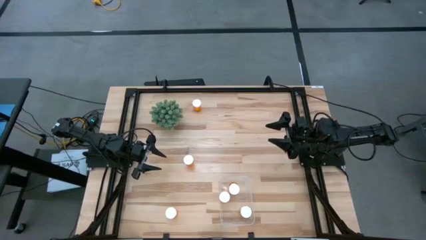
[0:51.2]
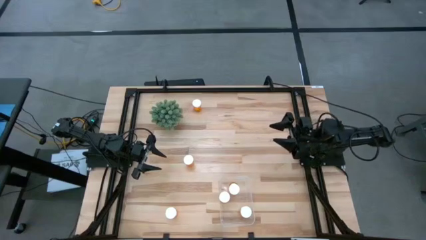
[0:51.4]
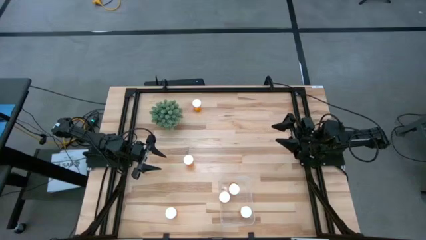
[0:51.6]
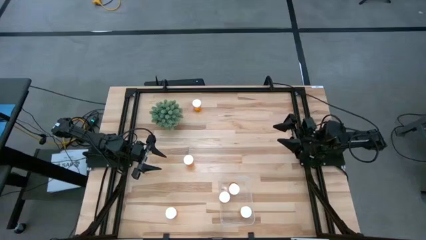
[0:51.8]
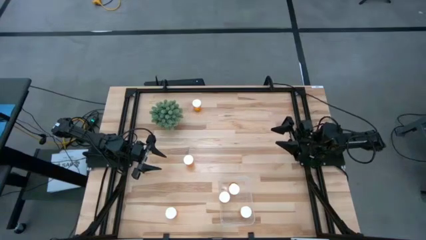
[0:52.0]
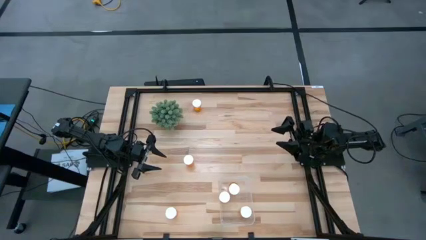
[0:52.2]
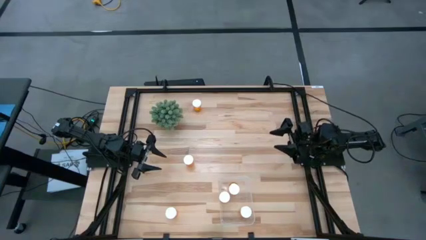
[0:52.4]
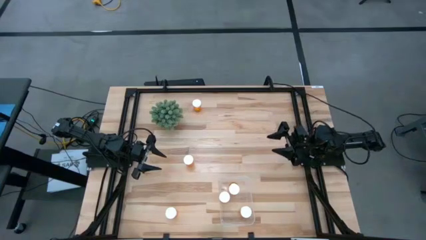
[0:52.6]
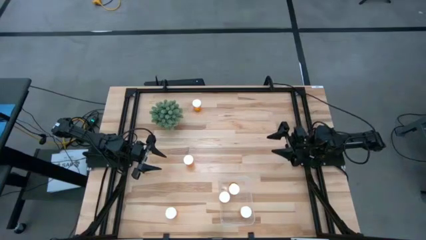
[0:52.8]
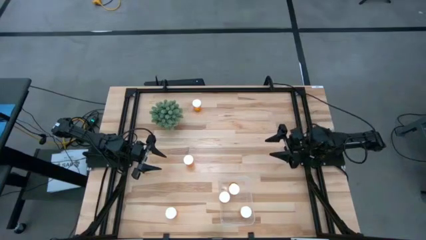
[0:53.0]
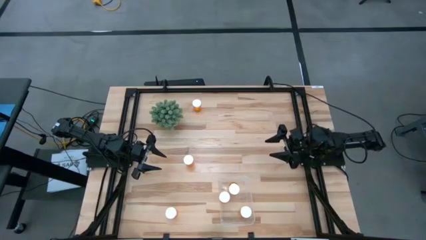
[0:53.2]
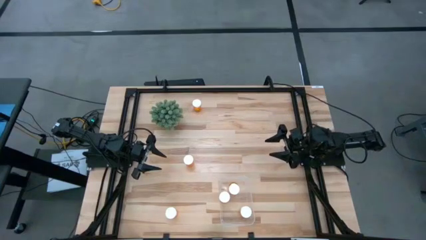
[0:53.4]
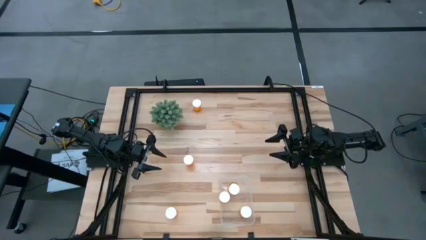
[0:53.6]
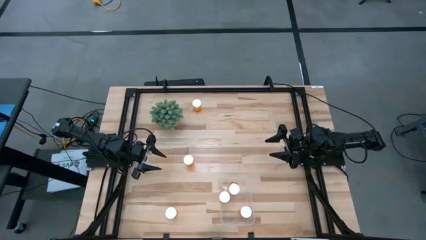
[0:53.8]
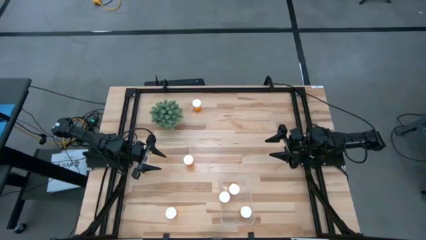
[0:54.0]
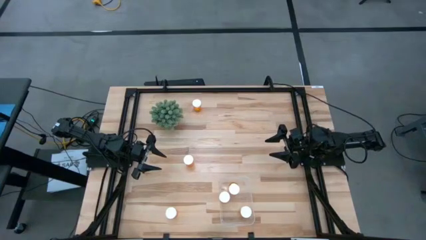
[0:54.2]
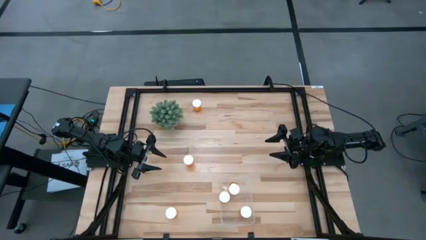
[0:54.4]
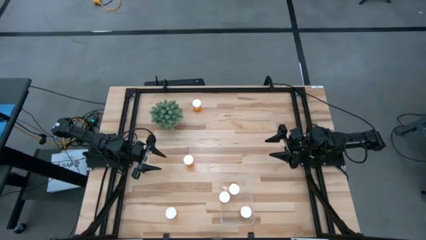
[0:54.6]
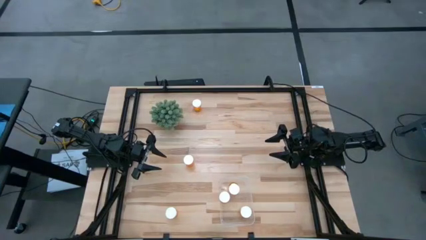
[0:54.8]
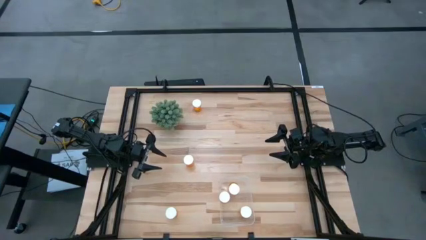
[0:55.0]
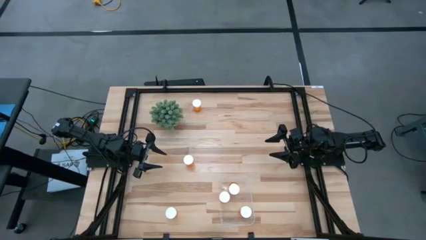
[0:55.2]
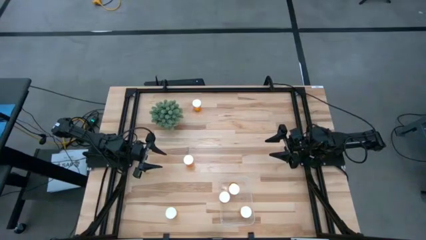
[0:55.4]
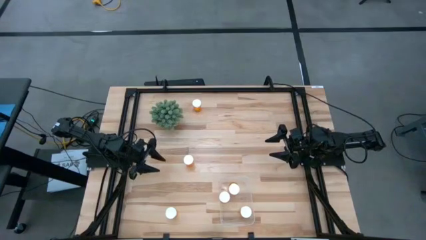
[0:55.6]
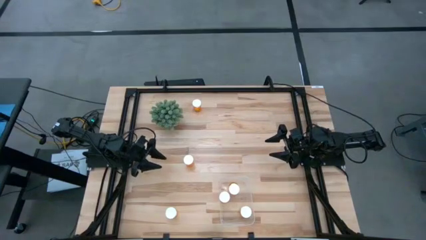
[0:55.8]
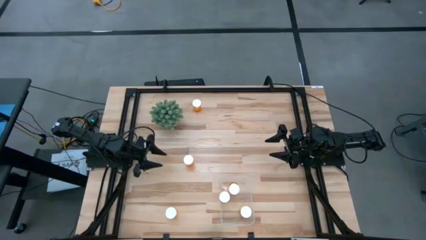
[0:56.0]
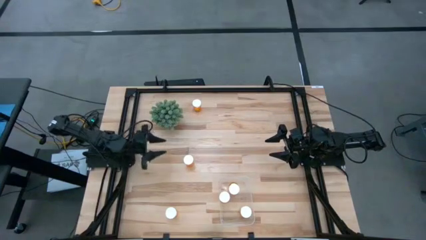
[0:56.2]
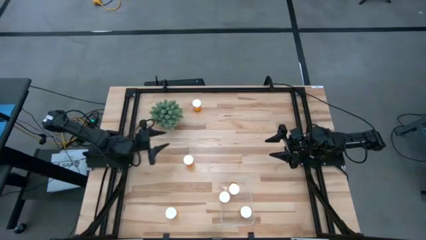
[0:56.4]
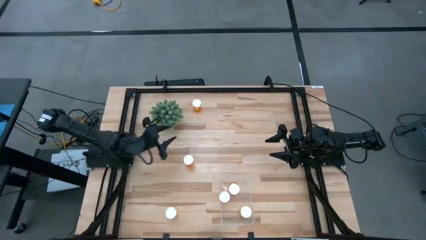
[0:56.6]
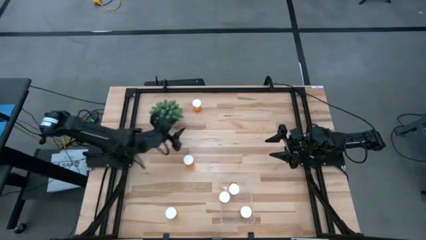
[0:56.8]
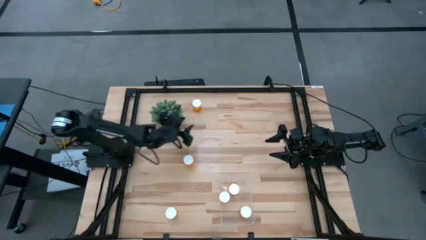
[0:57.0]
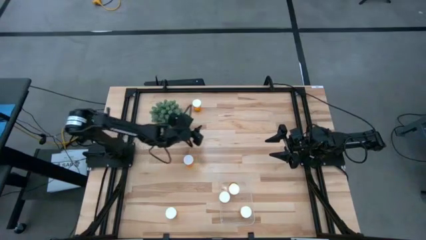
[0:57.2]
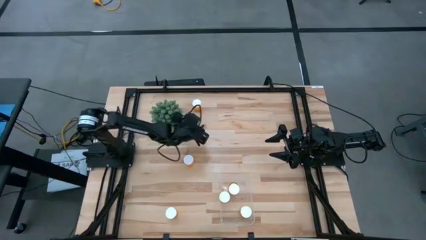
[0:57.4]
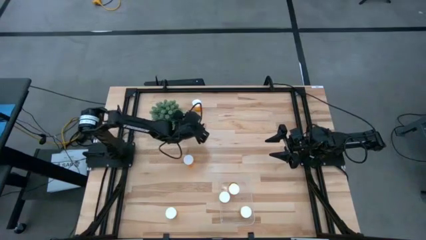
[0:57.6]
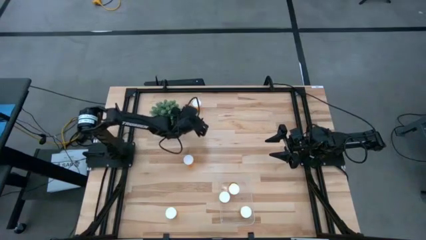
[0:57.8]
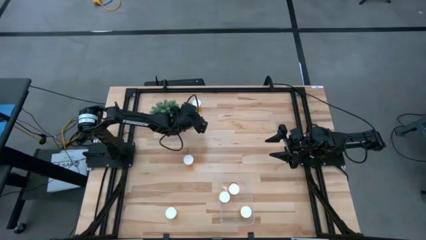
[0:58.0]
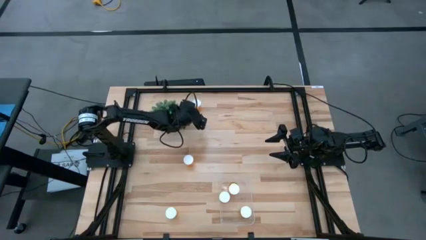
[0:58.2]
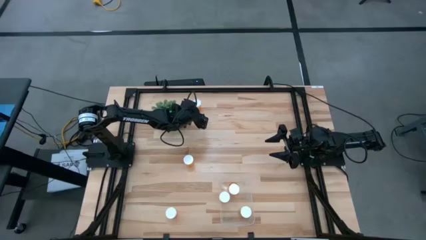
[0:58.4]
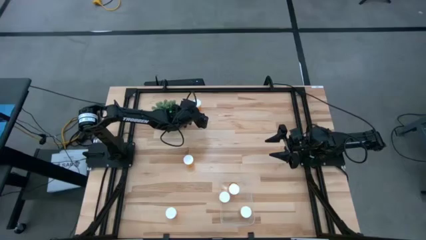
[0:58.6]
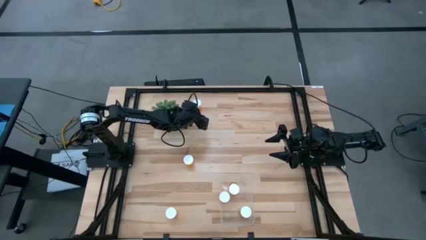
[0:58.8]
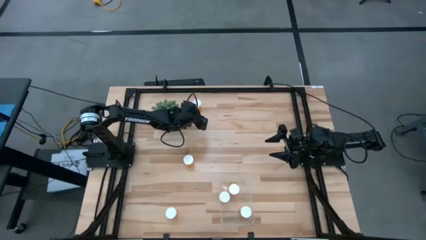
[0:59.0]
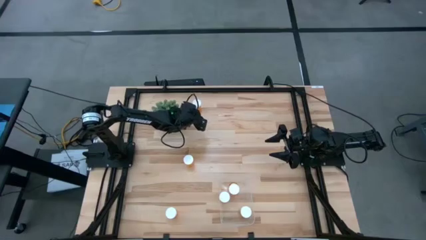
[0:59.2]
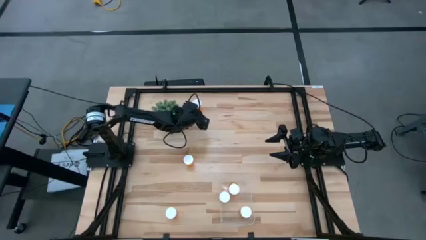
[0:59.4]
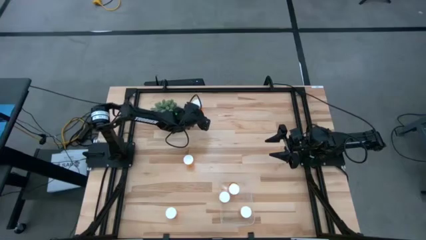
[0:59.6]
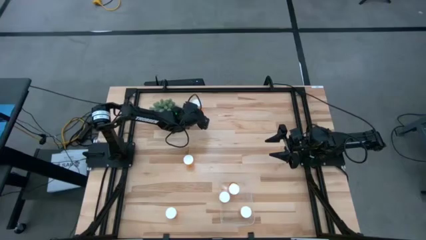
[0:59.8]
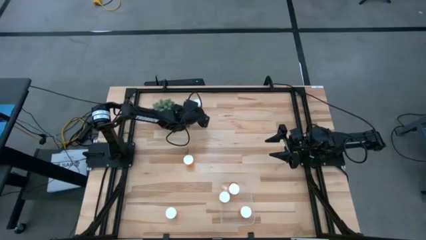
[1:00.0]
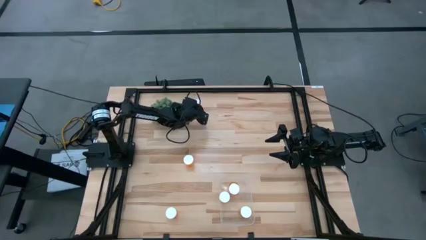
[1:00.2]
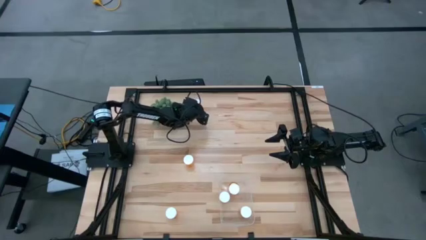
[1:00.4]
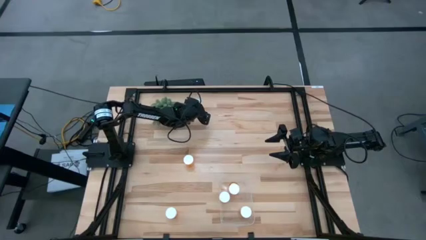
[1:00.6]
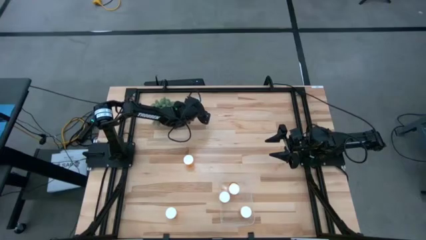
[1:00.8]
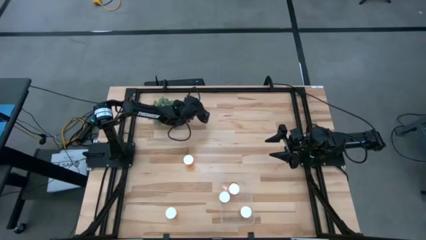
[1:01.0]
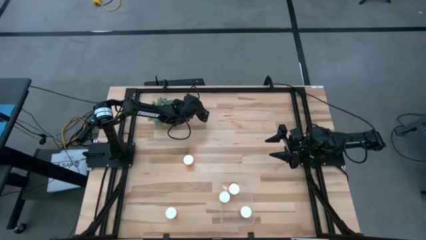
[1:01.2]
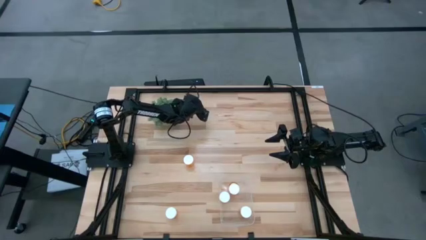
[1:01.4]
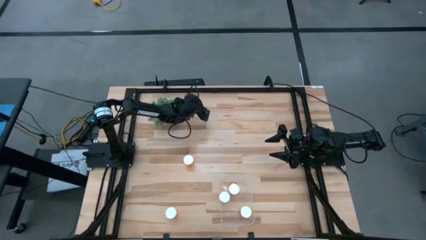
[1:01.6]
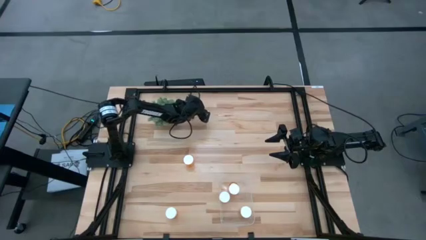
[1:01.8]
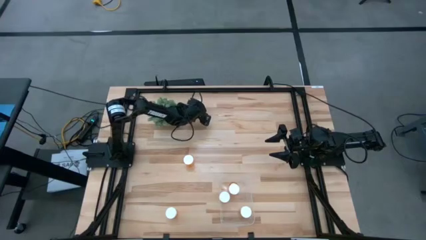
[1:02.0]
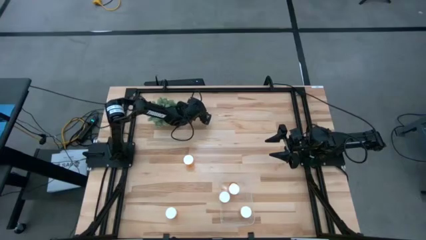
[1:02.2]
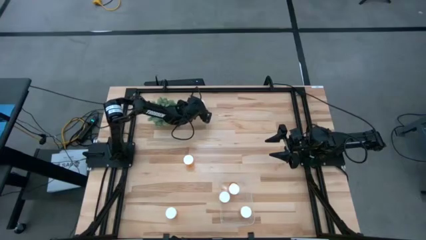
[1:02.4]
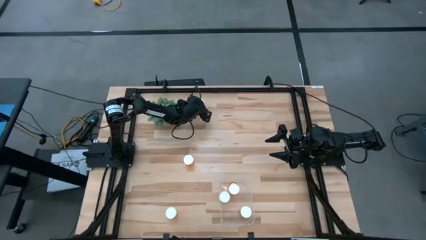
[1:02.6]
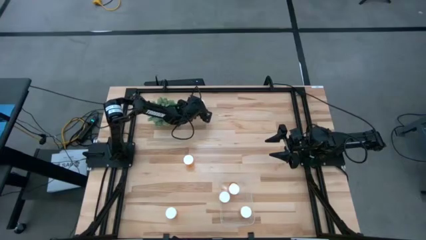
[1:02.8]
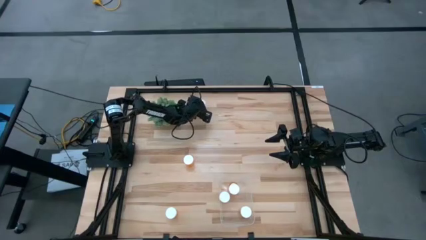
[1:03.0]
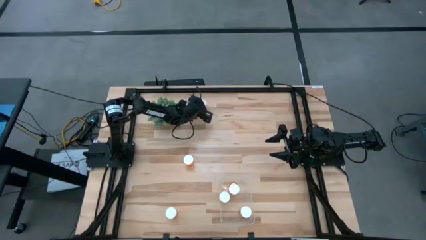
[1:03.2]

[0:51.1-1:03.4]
Task: Pick and place pill bottles into a basket
Put the top orange pill bottle into the transparent bin

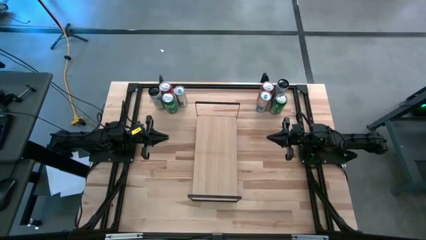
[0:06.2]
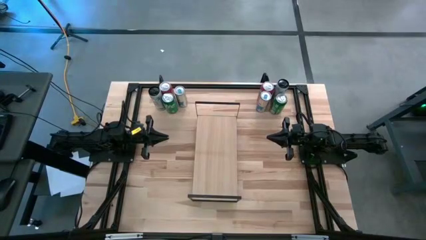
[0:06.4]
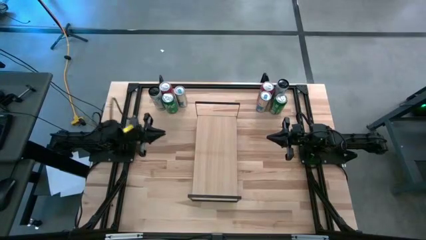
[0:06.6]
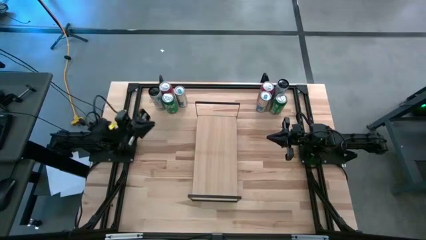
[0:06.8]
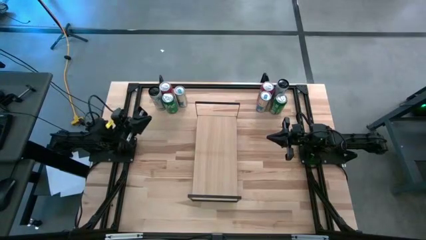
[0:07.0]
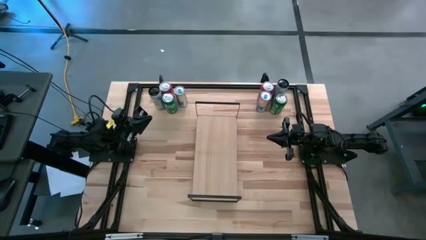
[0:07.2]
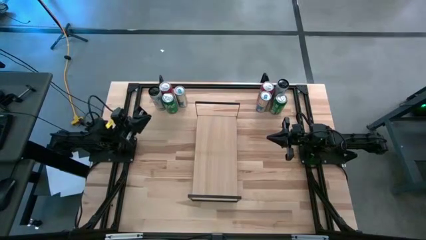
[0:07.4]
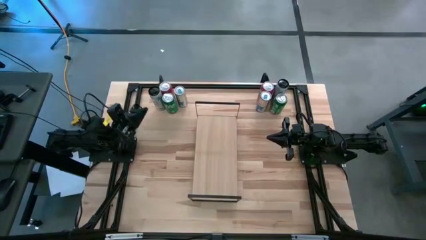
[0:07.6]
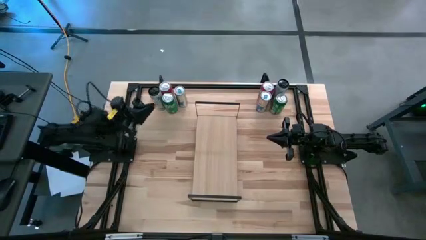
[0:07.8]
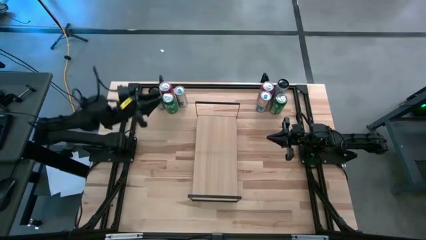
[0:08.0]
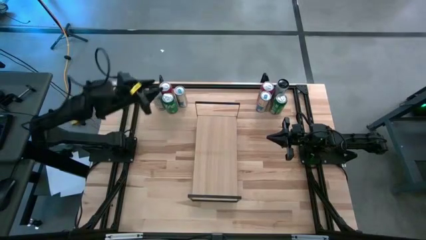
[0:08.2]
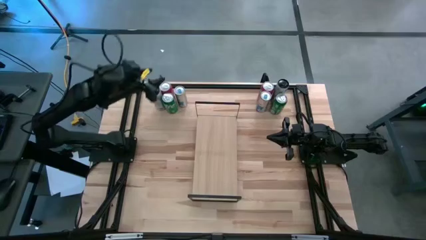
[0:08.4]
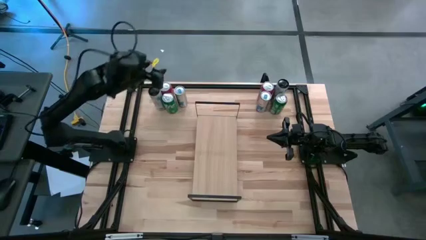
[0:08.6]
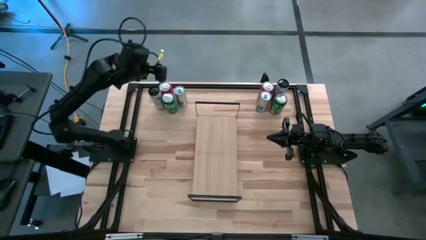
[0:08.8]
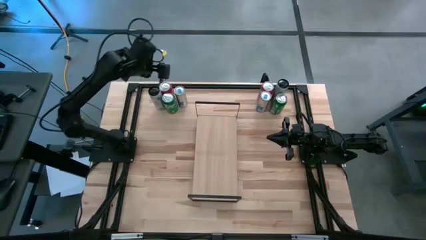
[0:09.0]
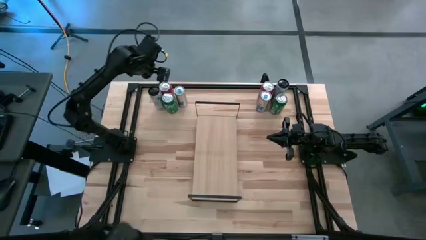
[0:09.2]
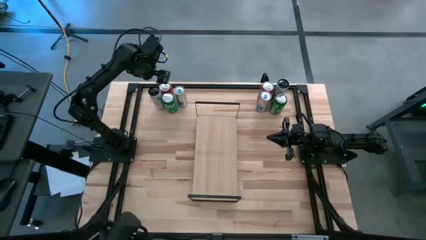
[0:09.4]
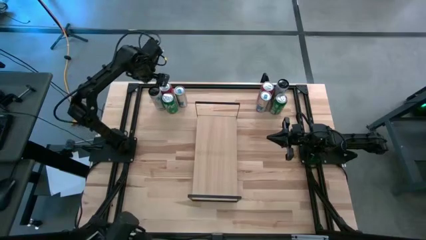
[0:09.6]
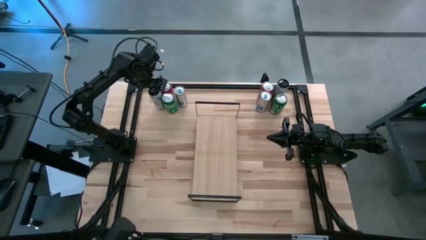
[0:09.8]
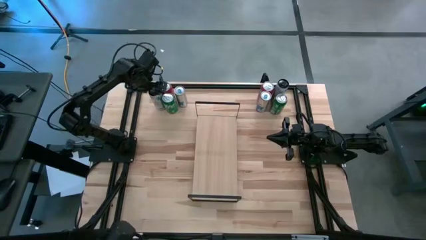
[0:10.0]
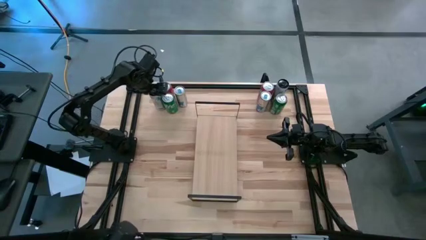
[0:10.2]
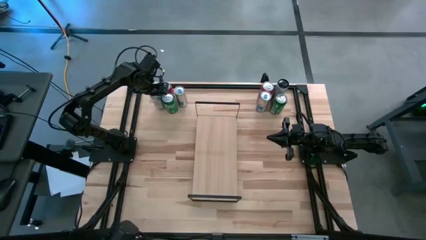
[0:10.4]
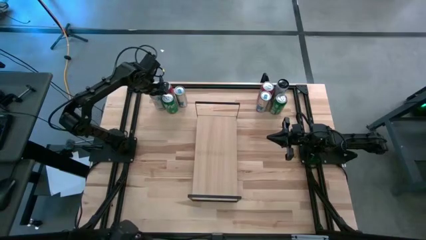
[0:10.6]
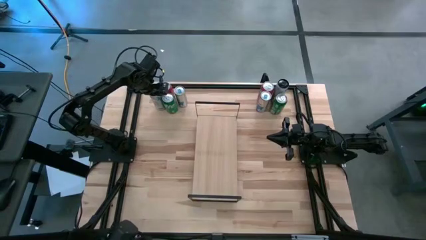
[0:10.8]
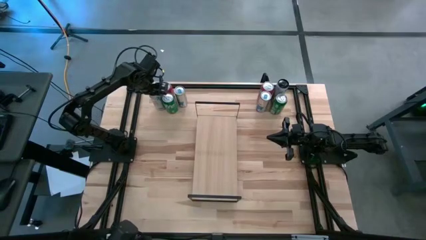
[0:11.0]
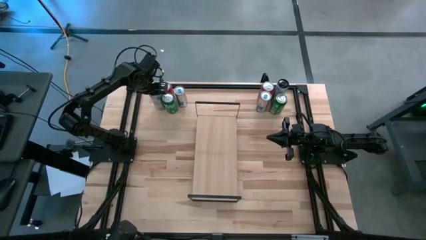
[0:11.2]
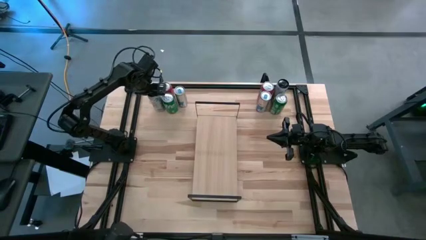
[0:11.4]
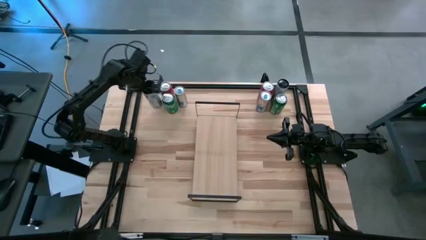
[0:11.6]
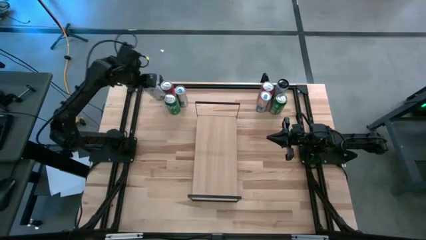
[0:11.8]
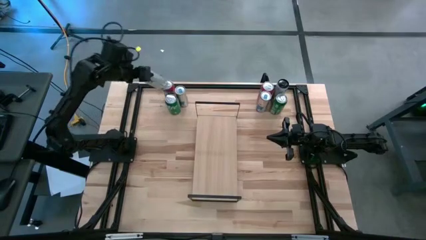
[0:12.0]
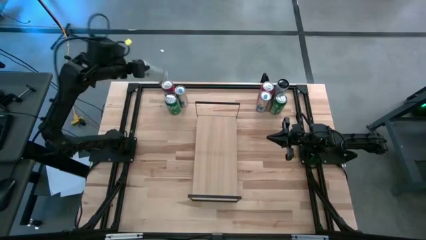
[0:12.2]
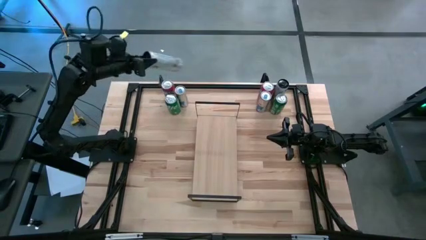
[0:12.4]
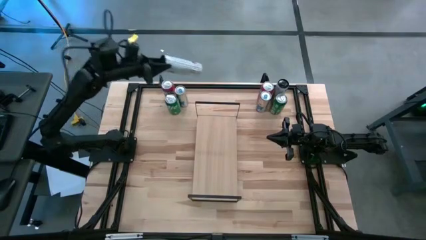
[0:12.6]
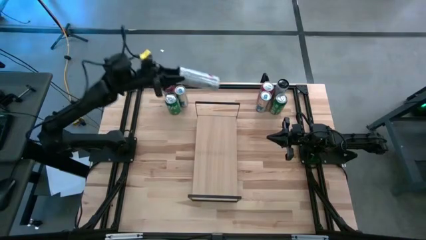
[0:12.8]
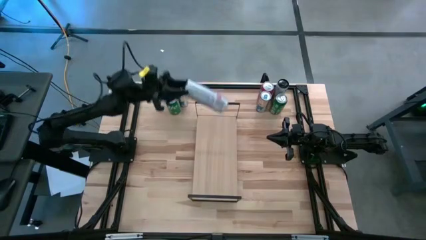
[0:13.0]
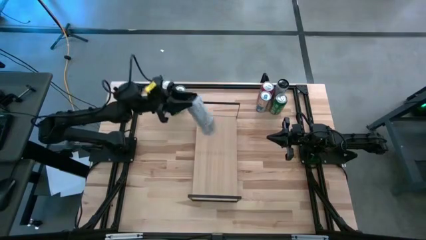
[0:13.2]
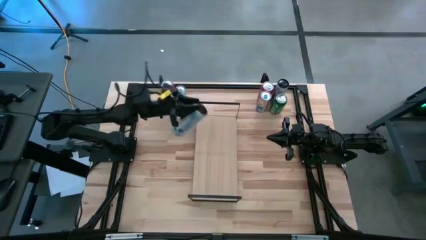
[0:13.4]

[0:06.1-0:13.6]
Task: Place canned beverage on shelf
Put the left white-pink soda can on the shelf
